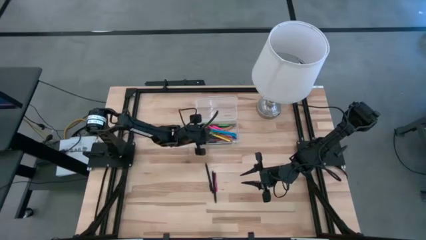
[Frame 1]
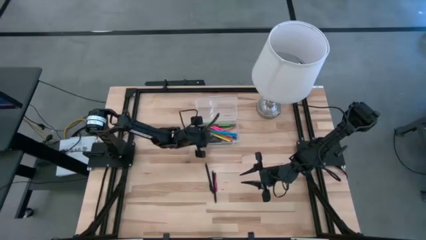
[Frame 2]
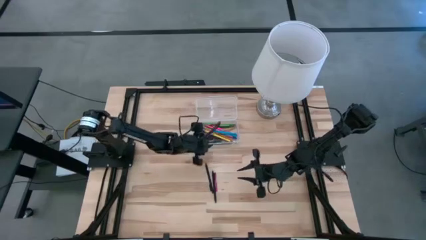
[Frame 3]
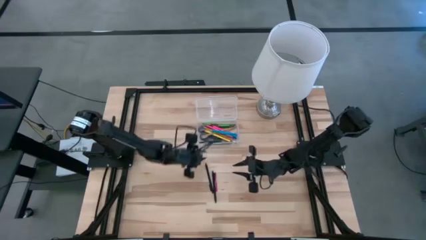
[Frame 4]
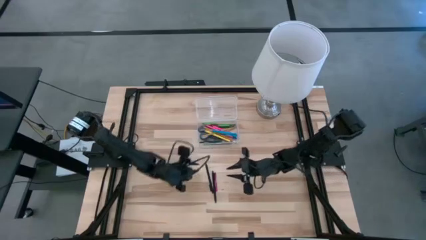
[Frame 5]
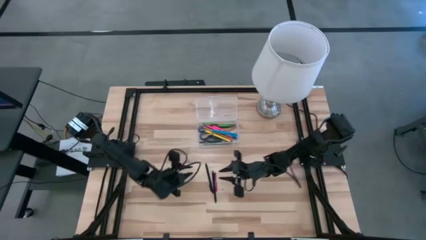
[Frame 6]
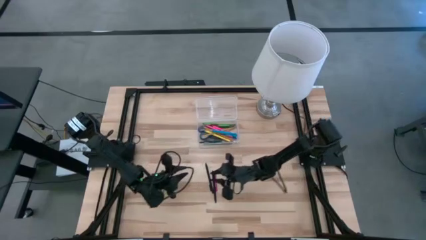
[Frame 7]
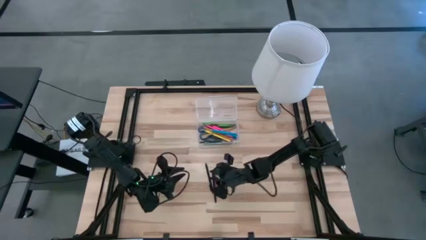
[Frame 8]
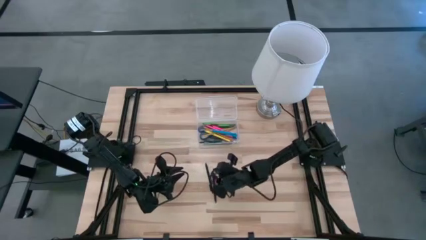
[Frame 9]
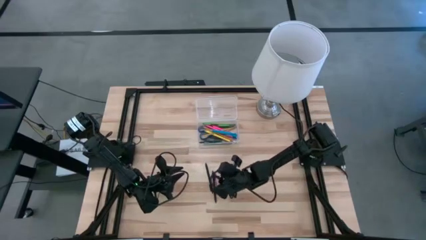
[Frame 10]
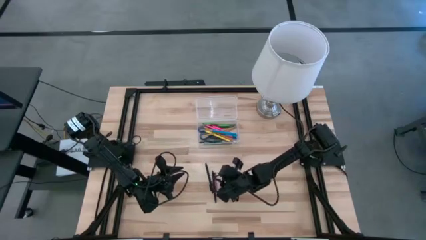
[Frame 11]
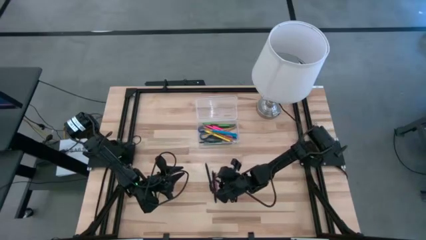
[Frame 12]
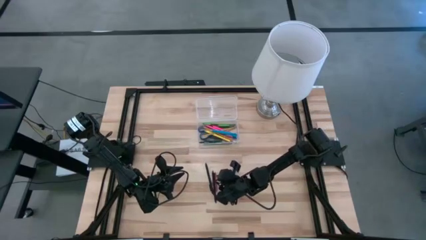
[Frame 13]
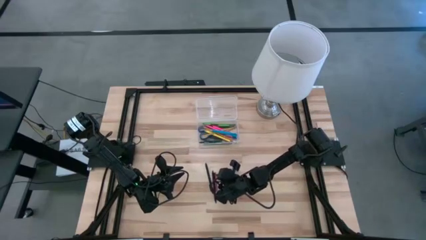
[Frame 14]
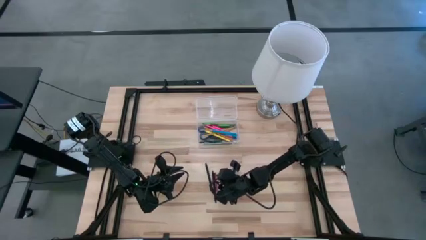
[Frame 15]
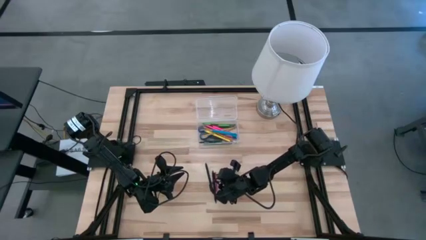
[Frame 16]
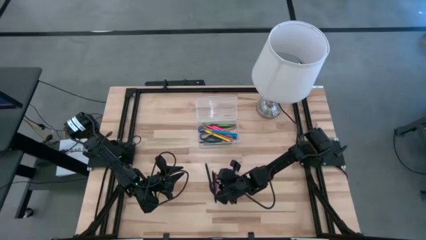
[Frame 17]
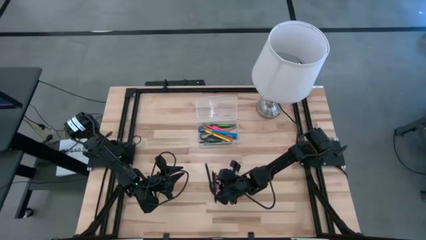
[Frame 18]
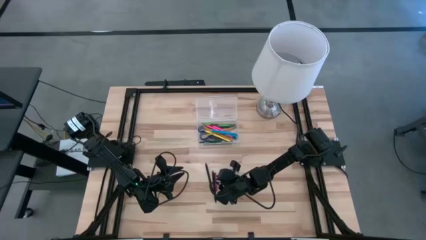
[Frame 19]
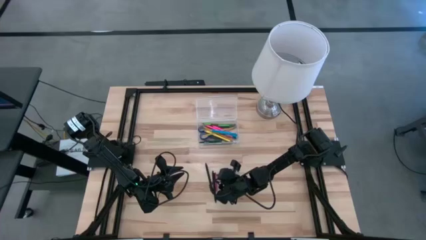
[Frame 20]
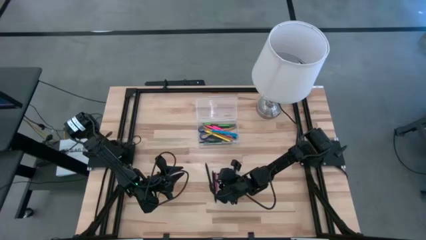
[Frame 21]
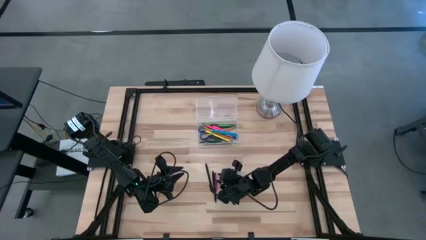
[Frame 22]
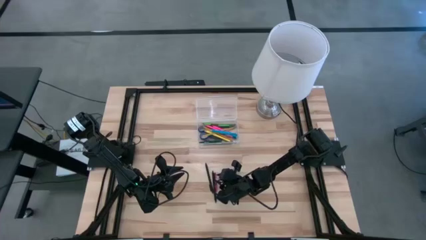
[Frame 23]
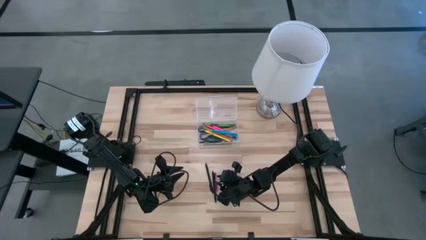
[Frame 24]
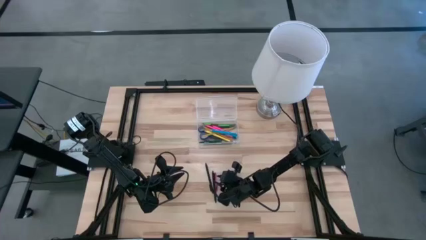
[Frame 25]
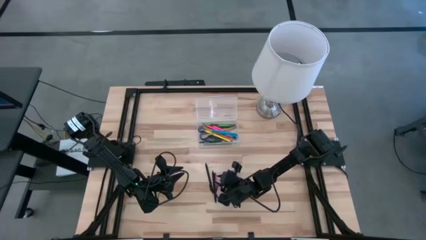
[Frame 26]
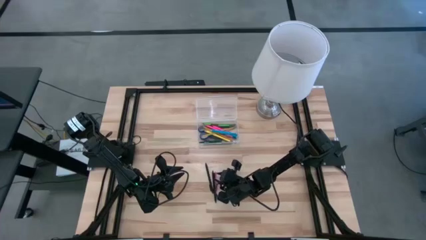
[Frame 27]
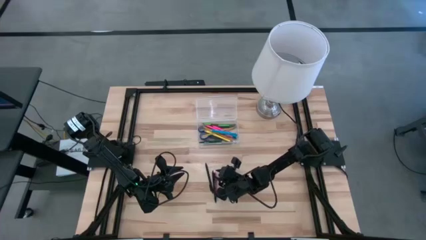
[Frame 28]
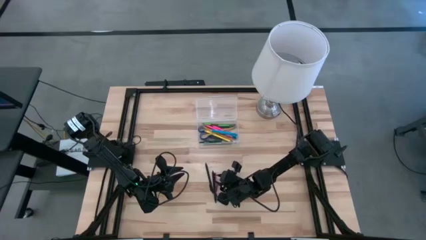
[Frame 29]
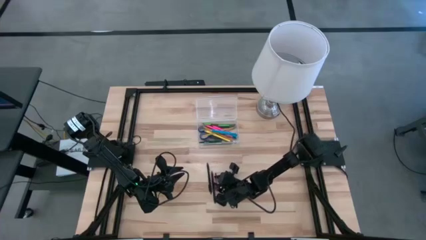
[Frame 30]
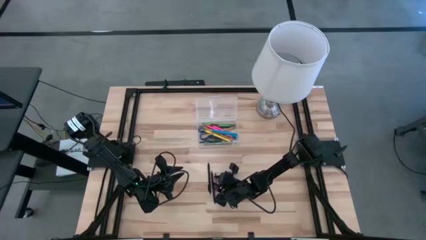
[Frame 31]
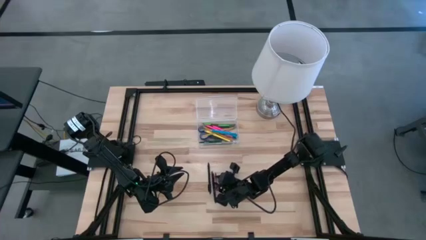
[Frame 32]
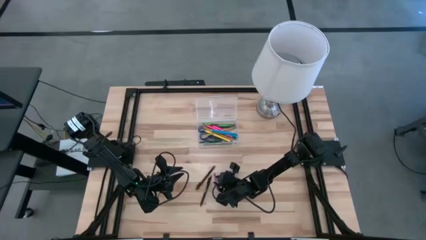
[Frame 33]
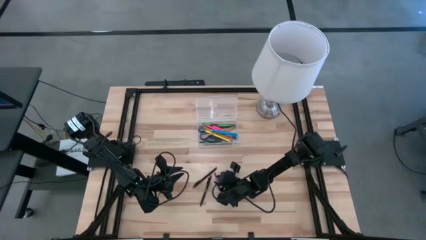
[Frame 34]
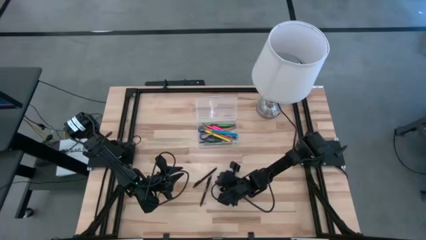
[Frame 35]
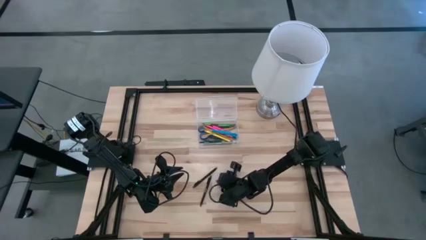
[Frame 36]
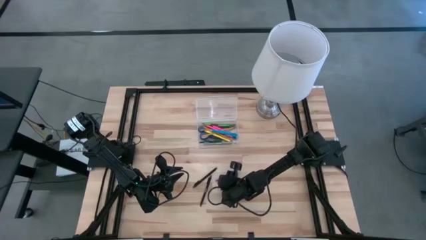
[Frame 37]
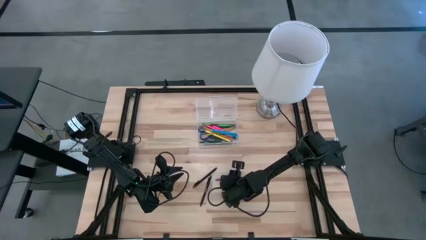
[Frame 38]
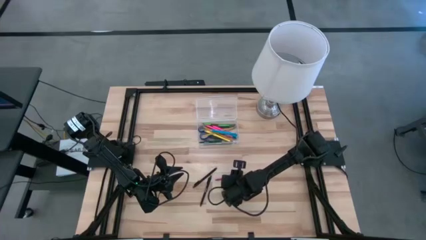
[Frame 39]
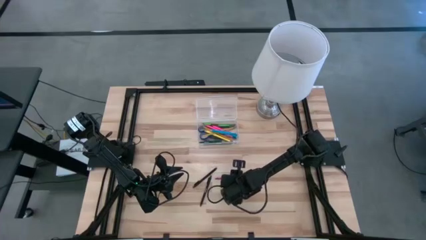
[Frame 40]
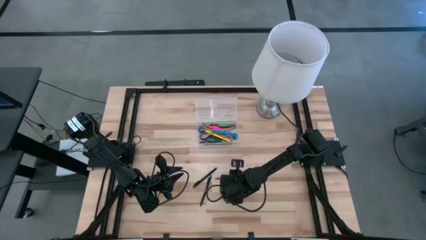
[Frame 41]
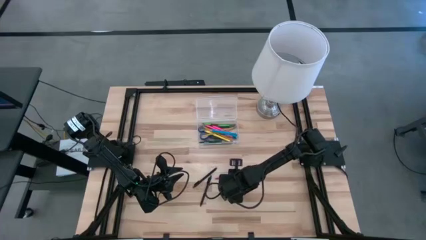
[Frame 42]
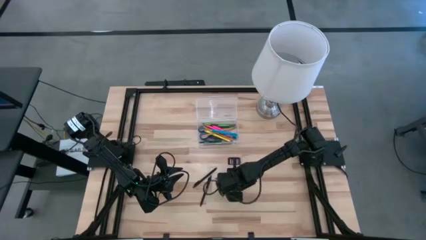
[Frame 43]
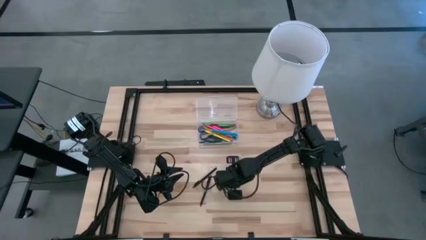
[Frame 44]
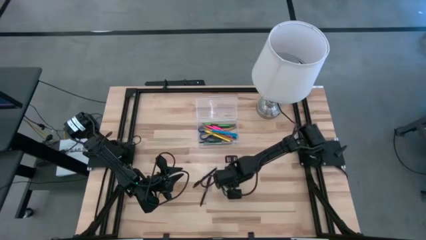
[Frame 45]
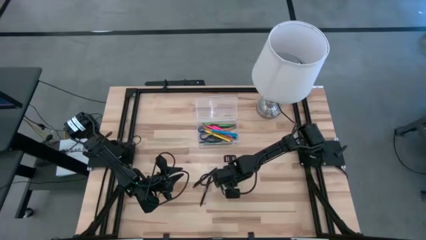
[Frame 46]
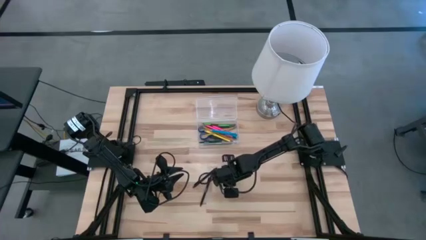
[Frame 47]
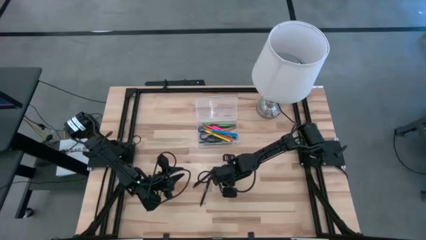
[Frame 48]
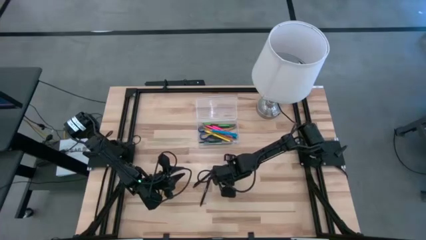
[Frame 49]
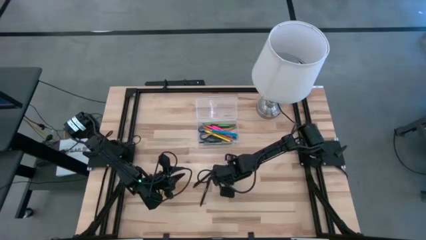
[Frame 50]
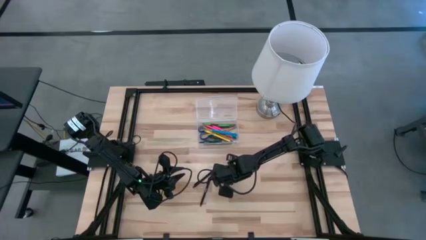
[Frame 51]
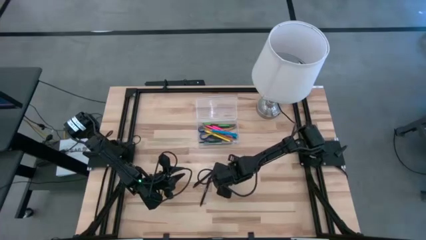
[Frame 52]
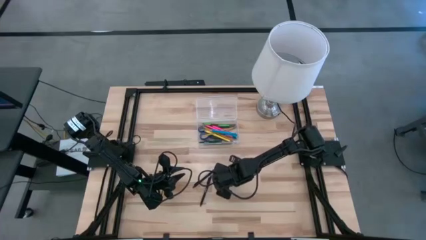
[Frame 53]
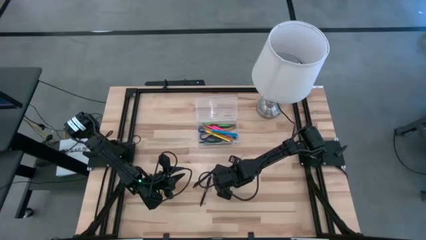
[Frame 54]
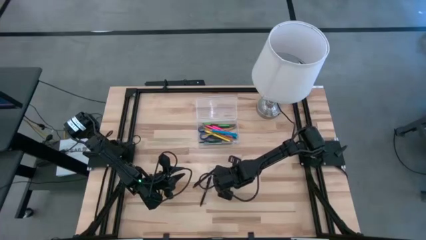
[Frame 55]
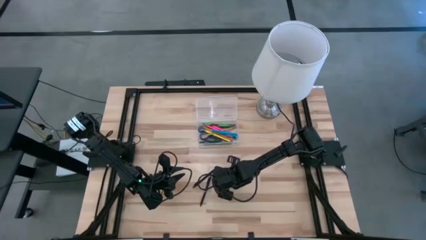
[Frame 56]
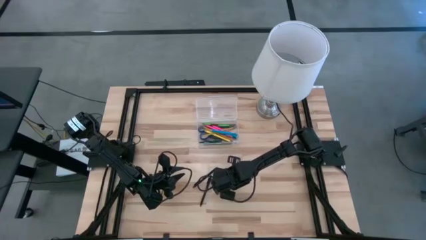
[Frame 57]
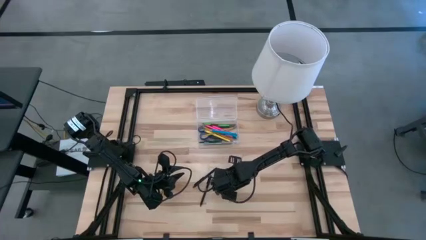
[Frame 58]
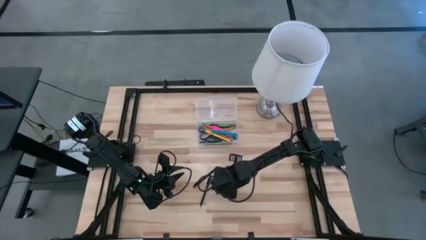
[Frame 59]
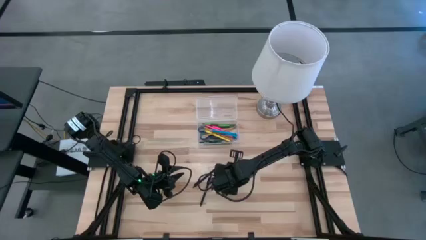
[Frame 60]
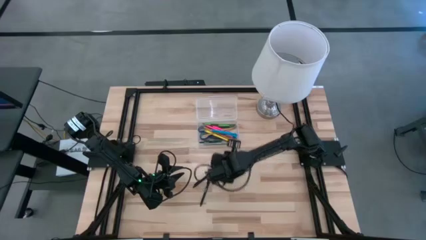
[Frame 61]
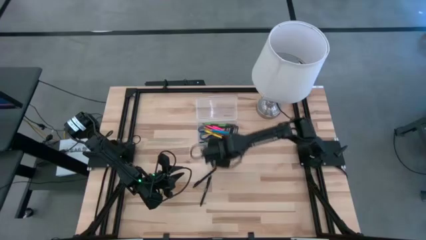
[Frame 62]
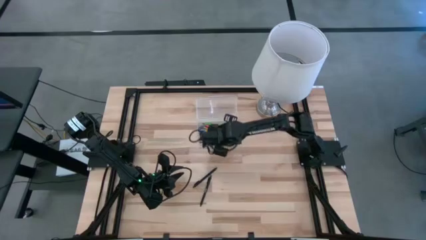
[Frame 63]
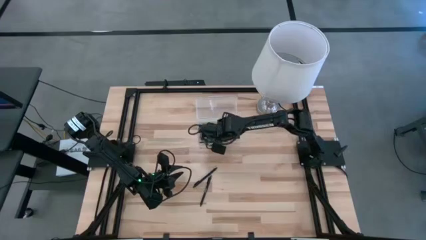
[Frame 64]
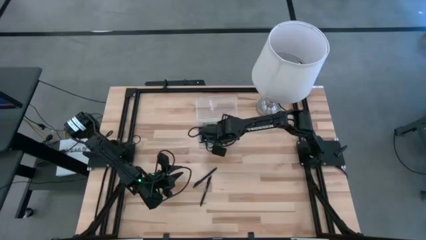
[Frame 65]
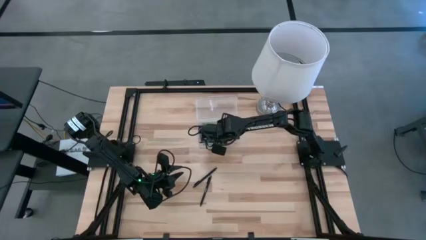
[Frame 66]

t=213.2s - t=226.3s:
Task: Pick & place school supplies into a supply box
Put the red crayon into the supply box
